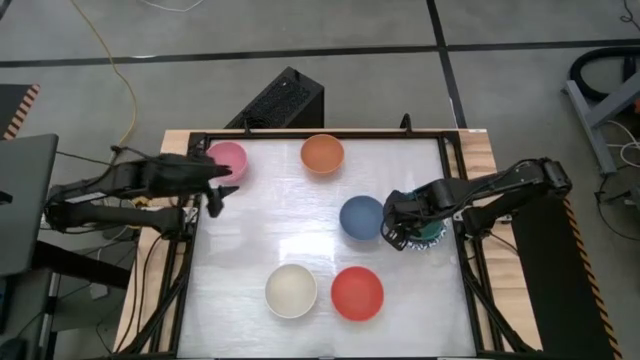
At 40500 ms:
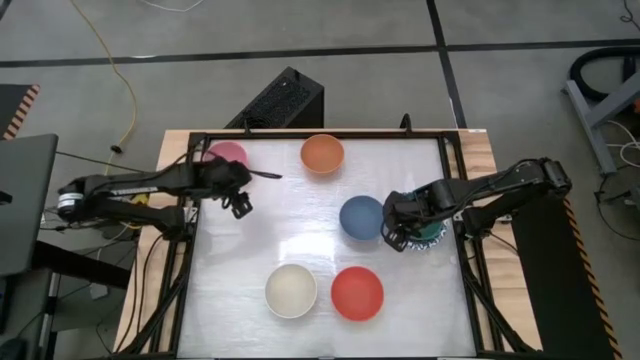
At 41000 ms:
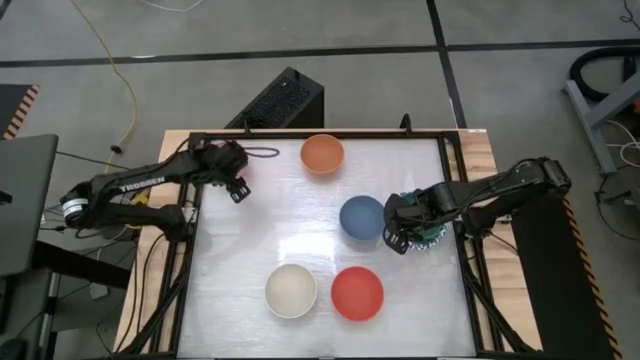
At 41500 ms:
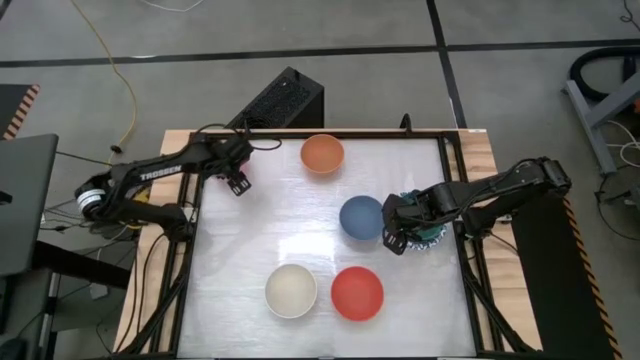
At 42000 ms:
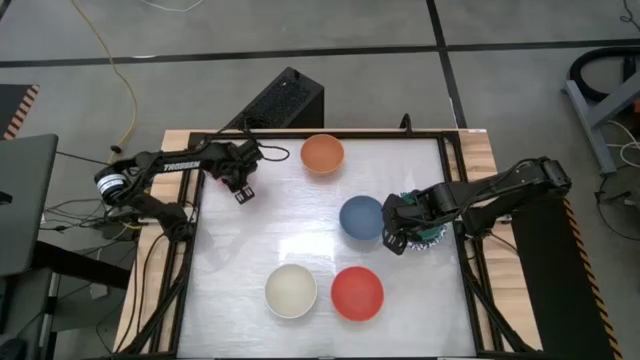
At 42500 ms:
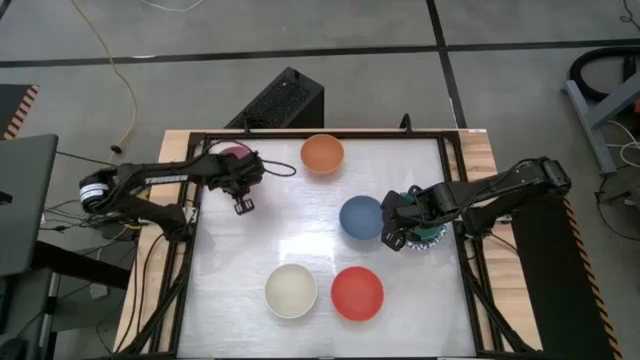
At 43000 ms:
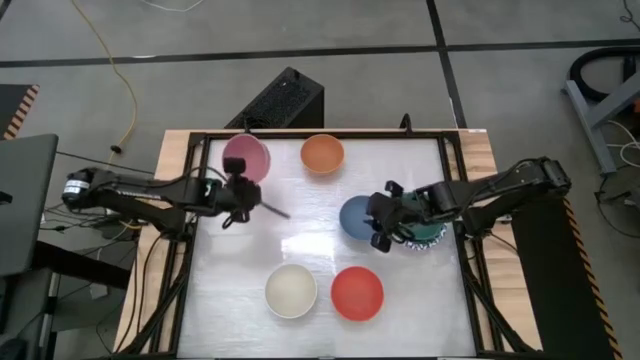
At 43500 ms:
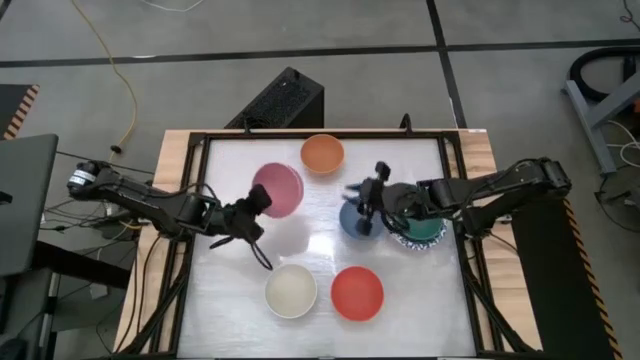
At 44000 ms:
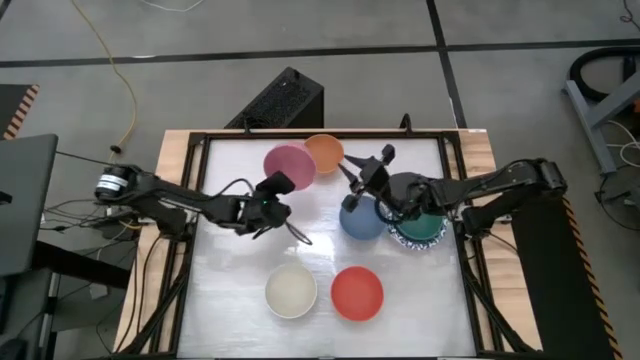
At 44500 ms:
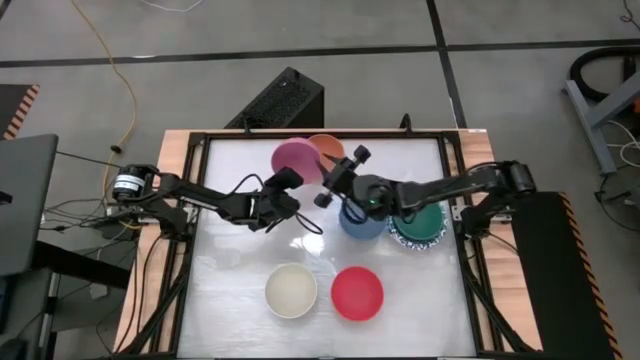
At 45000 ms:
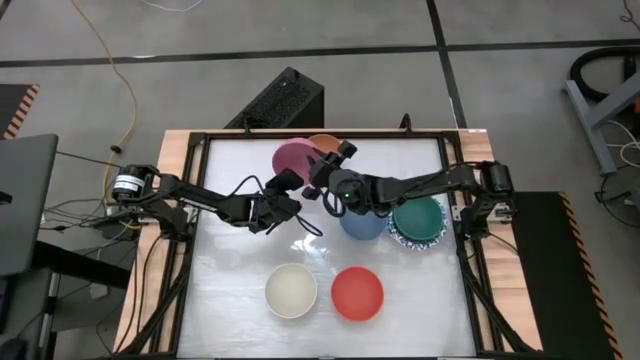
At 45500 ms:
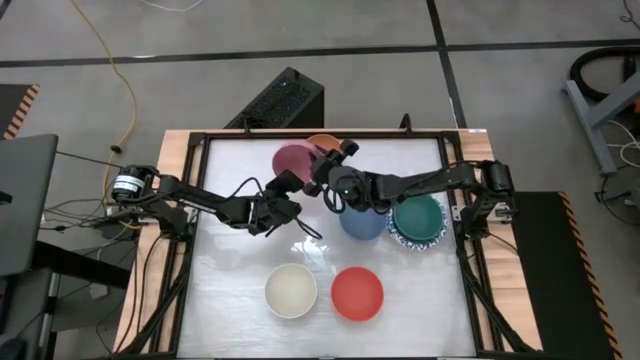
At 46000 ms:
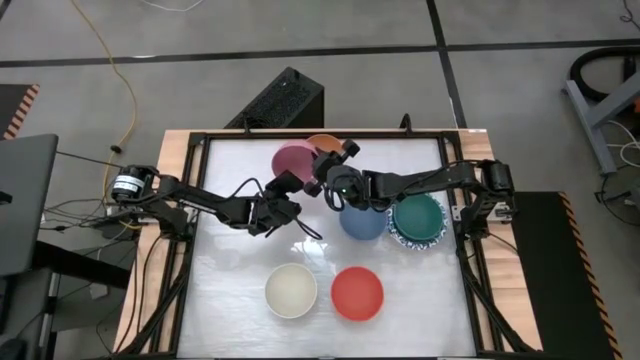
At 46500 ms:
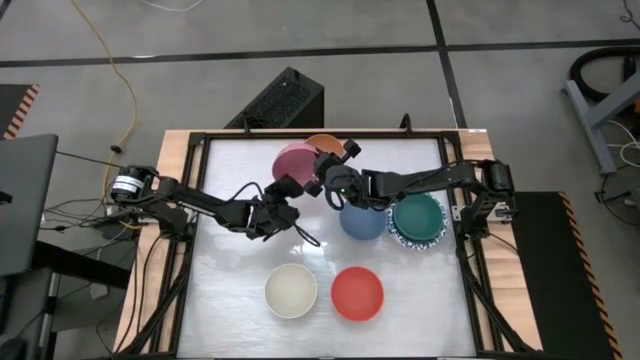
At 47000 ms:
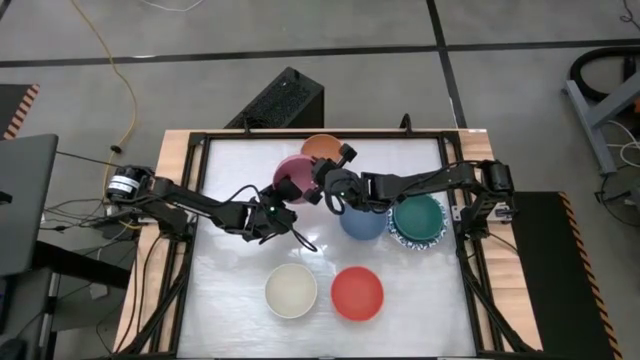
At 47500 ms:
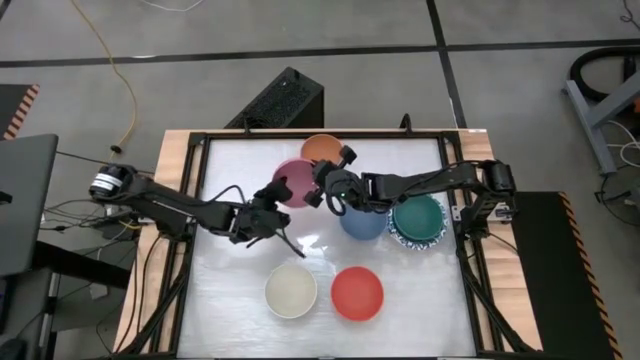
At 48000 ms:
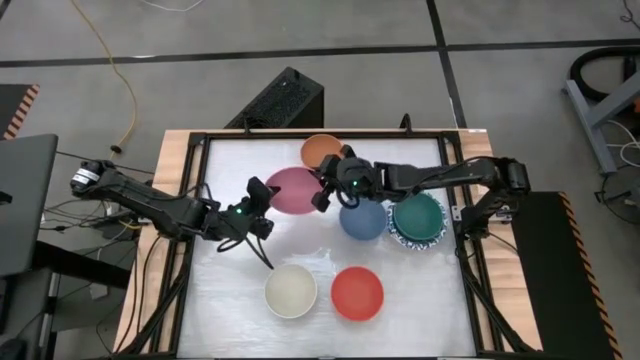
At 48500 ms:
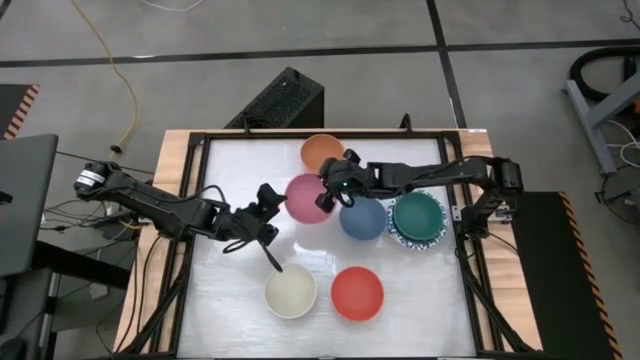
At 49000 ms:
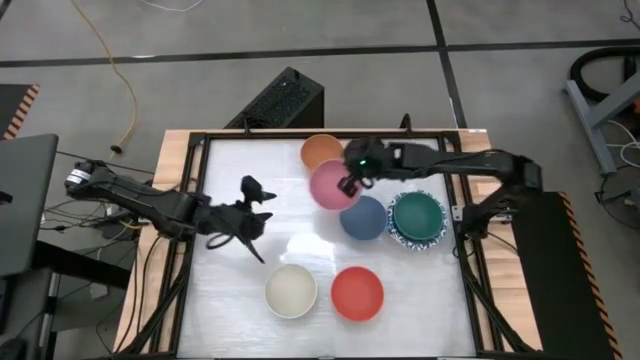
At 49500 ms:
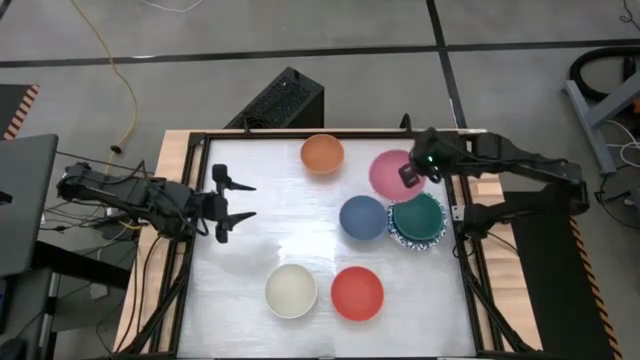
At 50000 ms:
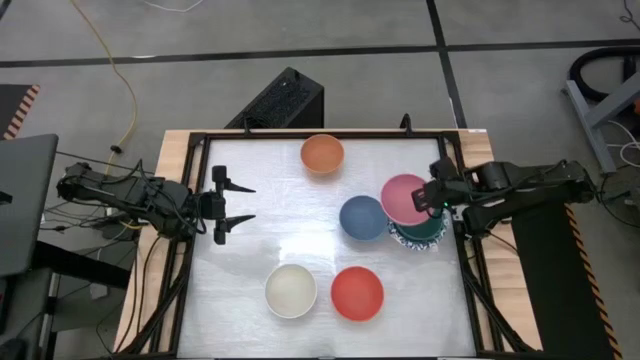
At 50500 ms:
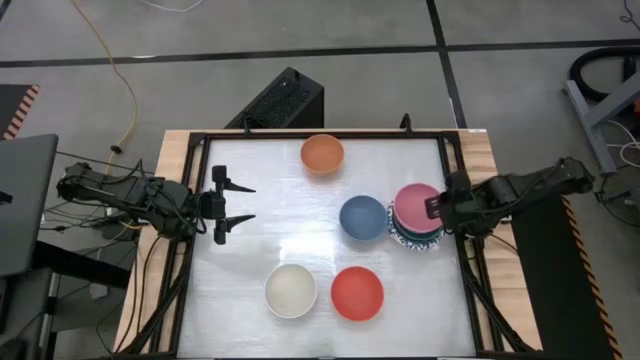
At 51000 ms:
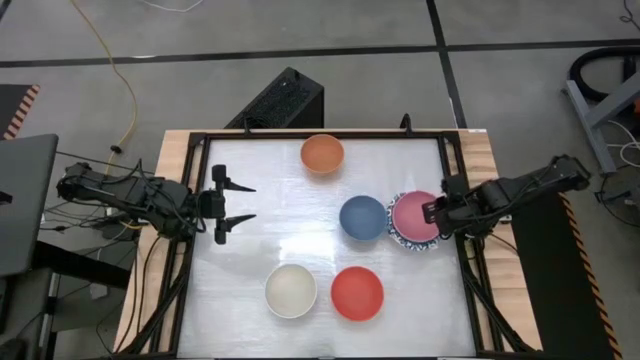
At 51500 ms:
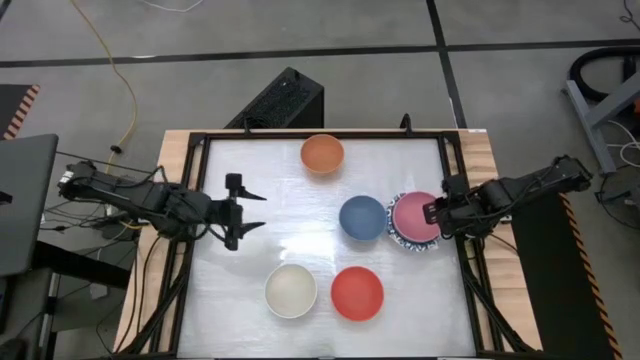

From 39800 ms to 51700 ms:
Stack the pink bowl on top of the green bowl

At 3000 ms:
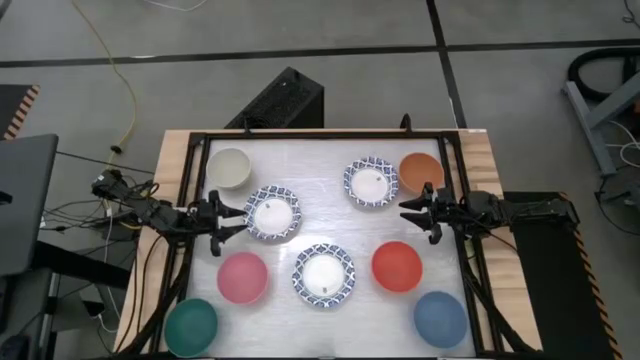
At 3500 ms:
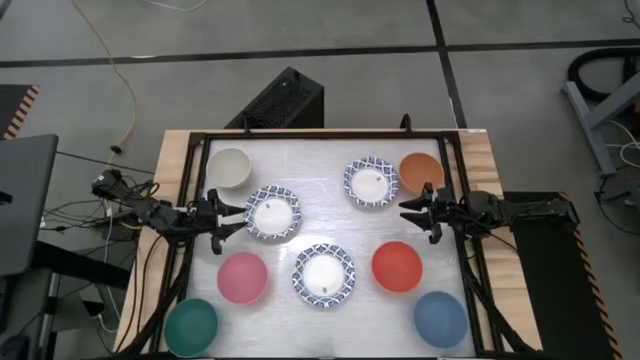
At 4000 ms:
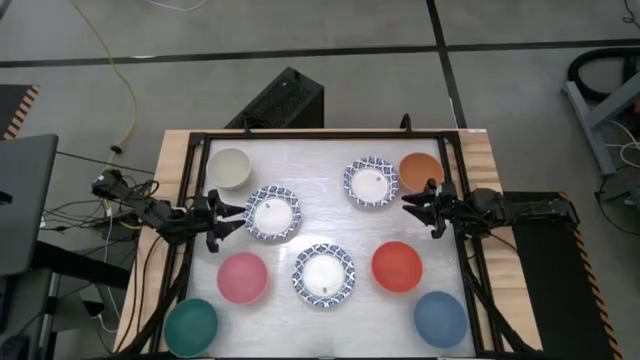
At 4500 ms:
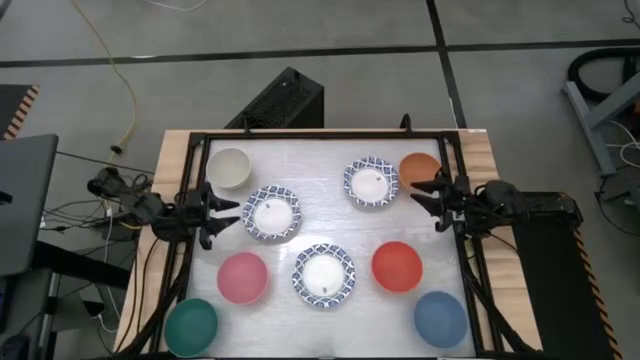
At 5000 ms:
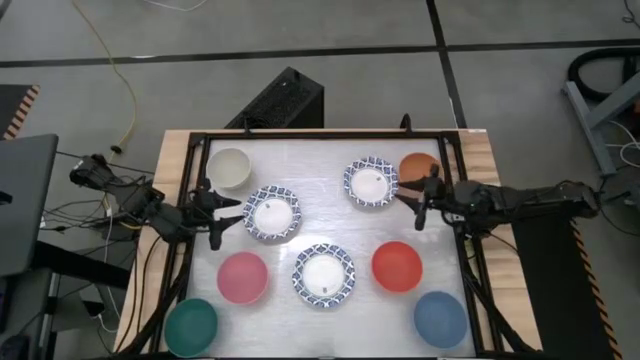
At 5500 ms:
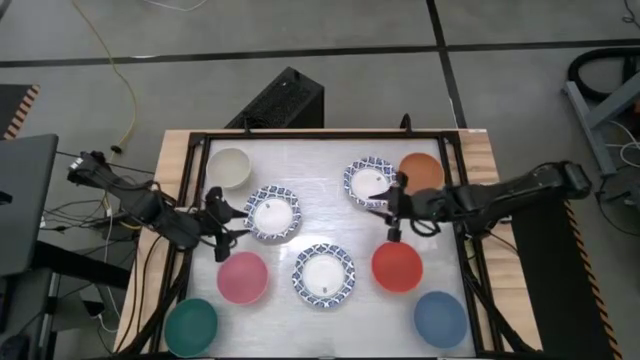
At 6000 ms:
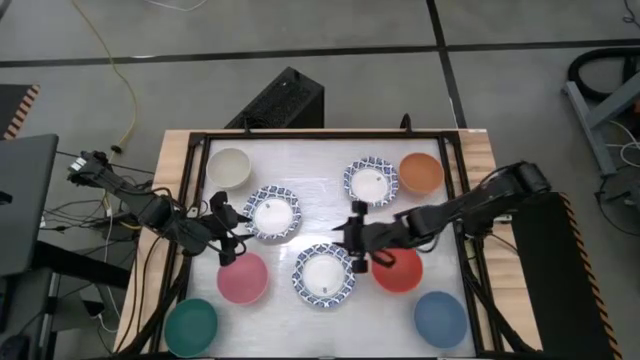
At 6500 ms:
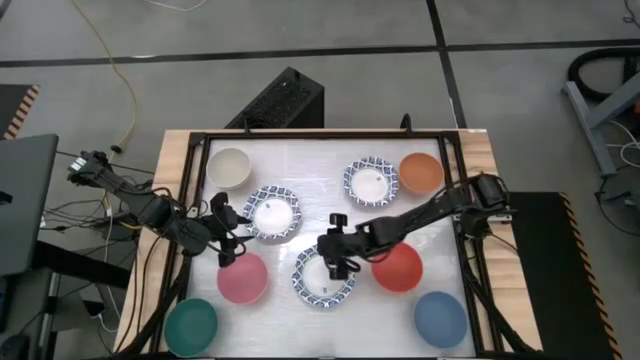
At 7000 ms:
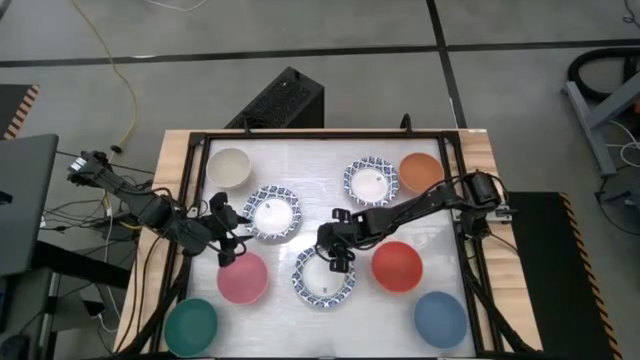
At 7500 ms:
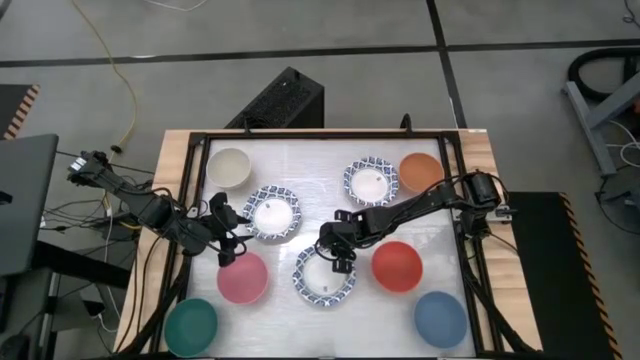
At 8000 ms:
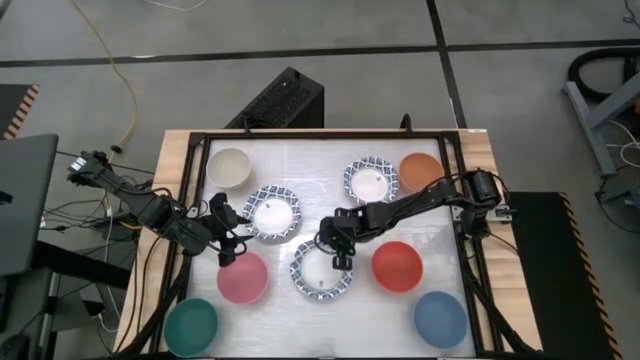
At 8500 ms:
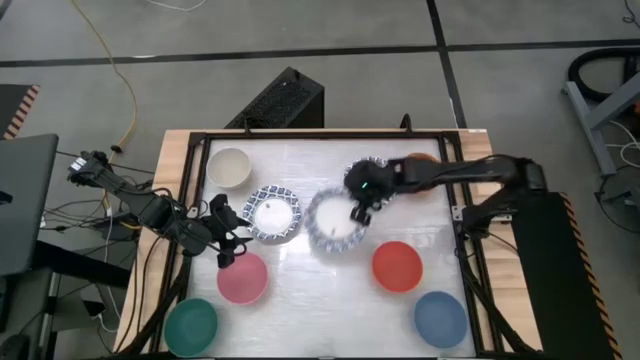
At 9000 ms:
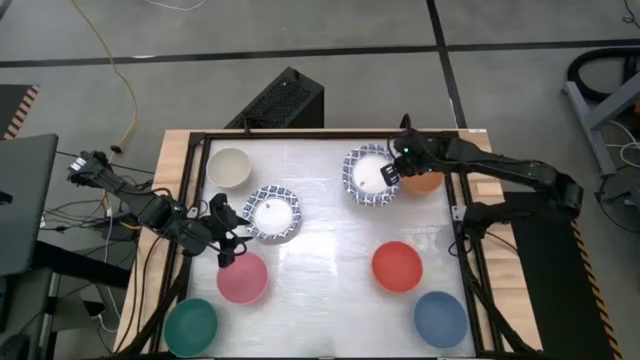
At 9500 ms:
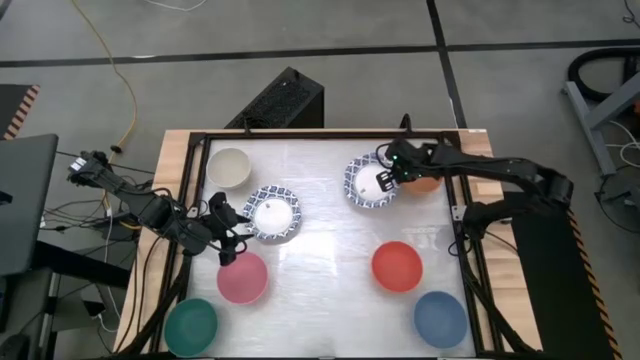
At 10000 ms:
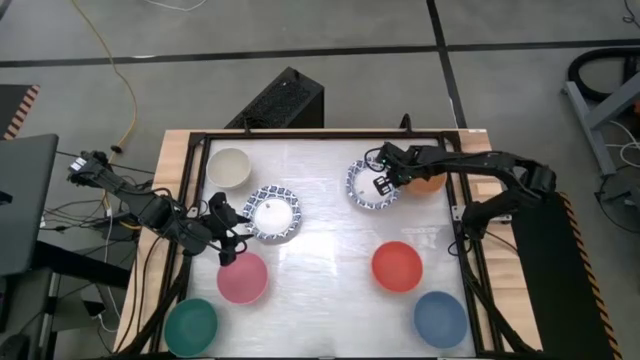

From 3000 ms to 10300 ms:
Stack the bottom white patterned bowl on top of the top white patterned bowl
